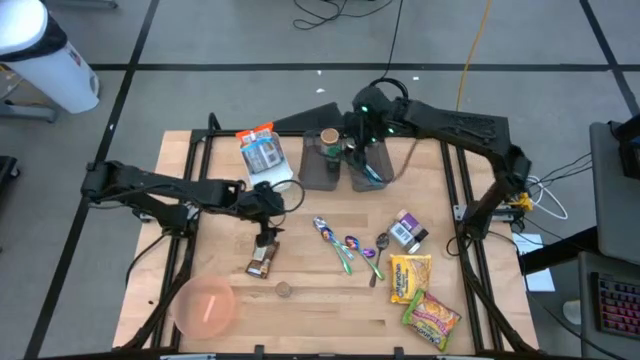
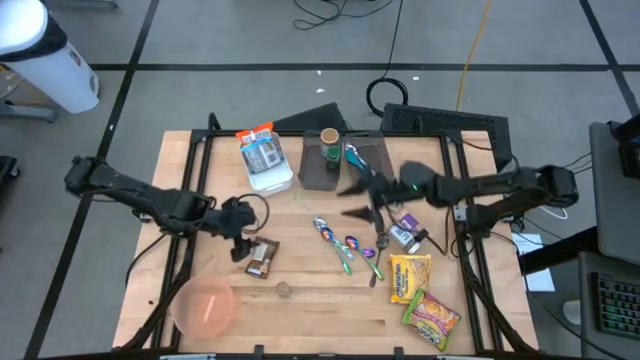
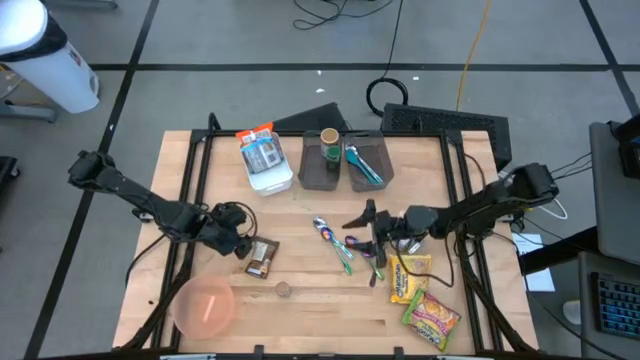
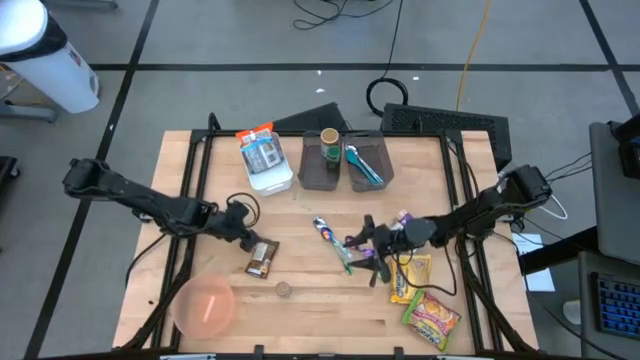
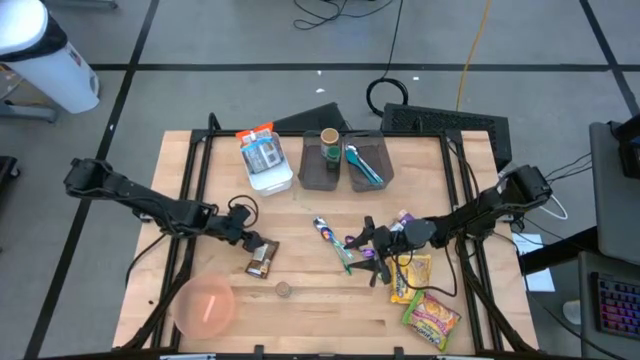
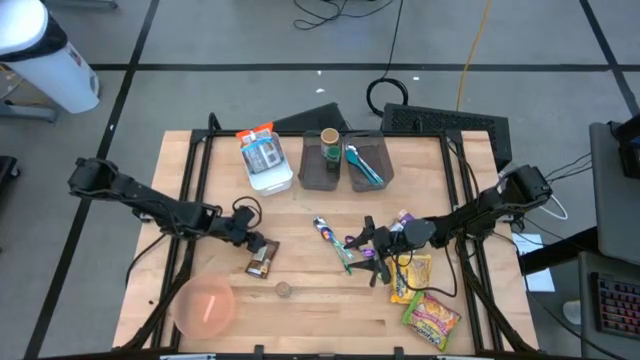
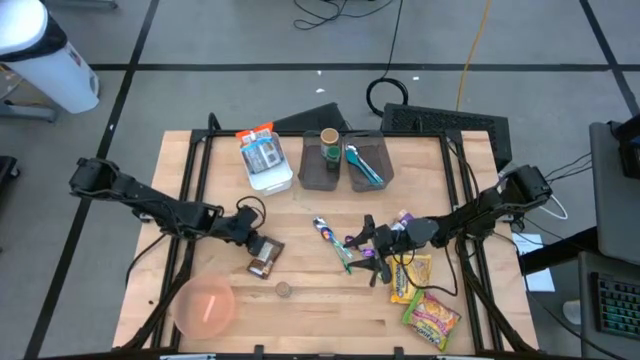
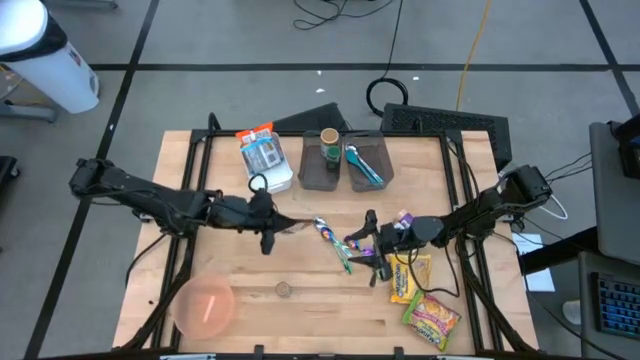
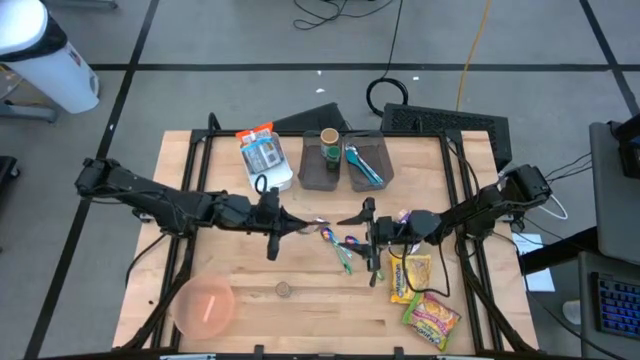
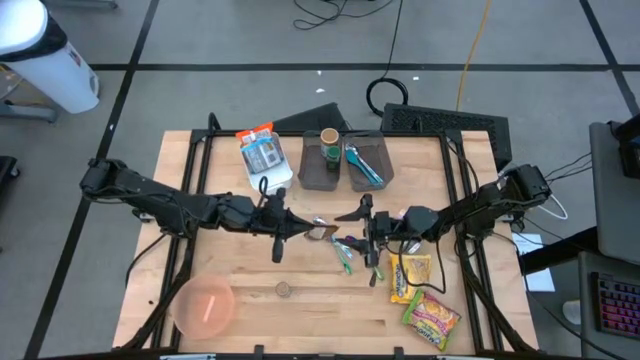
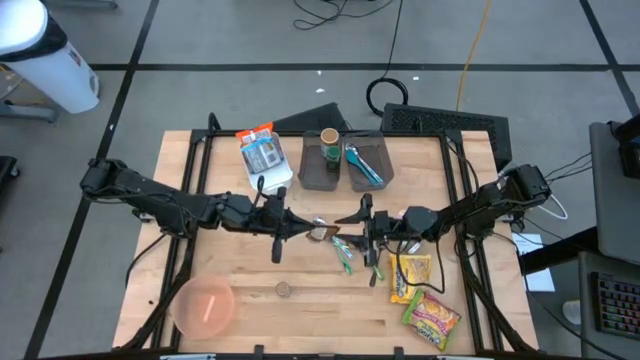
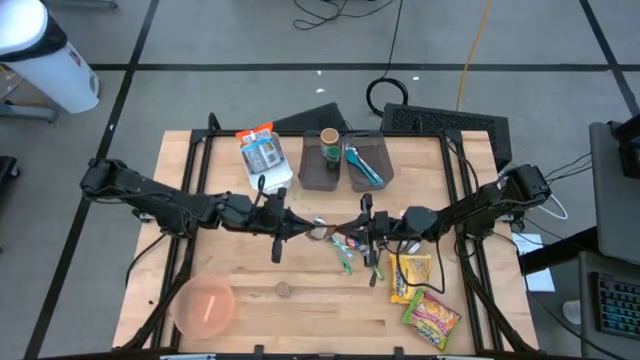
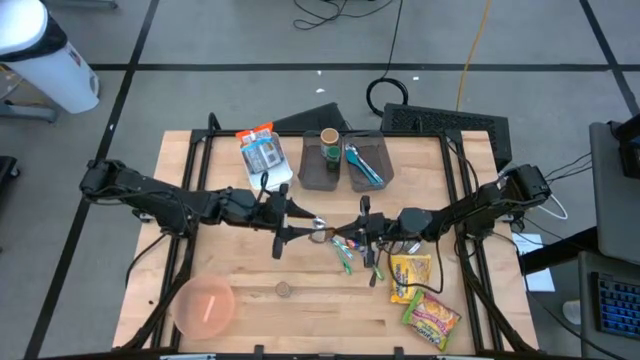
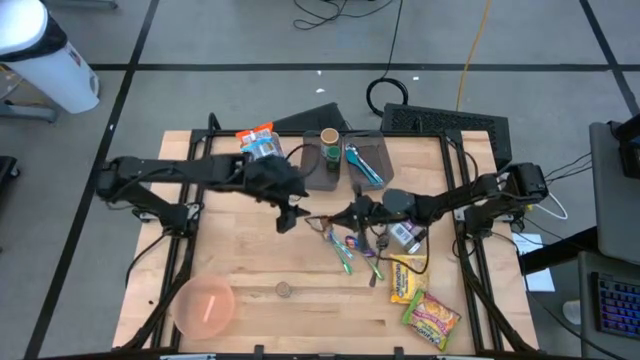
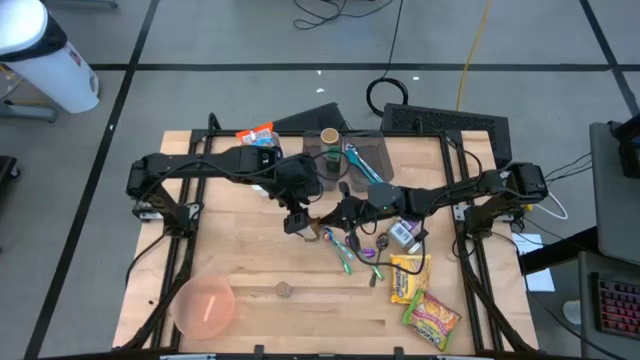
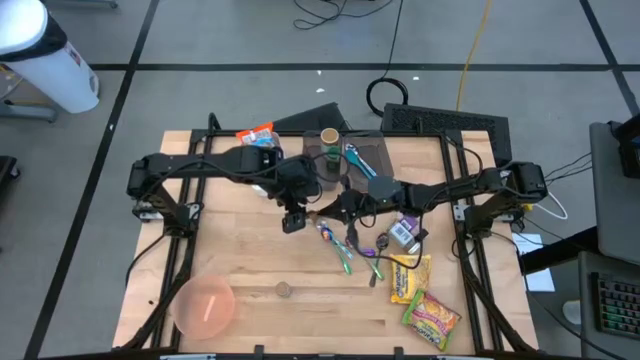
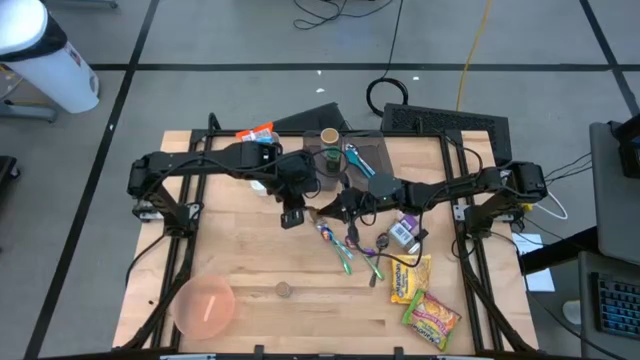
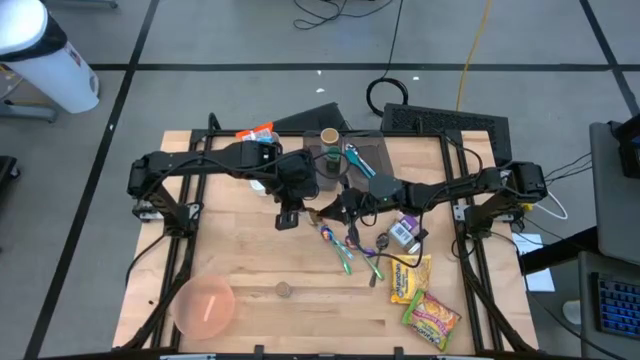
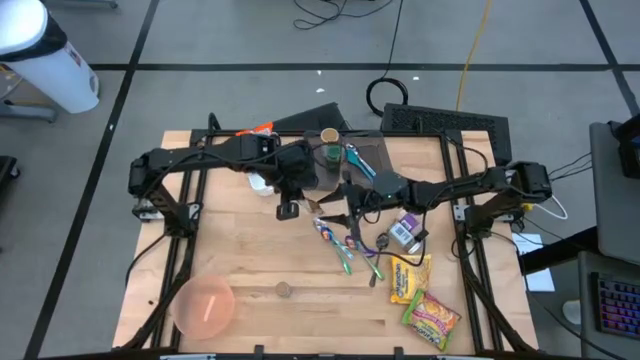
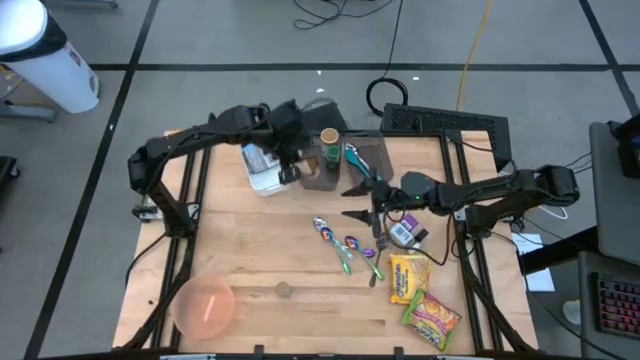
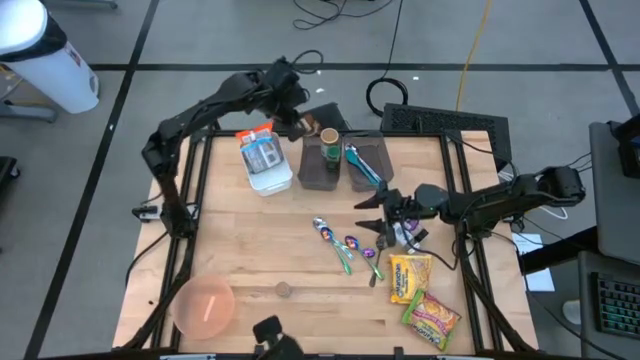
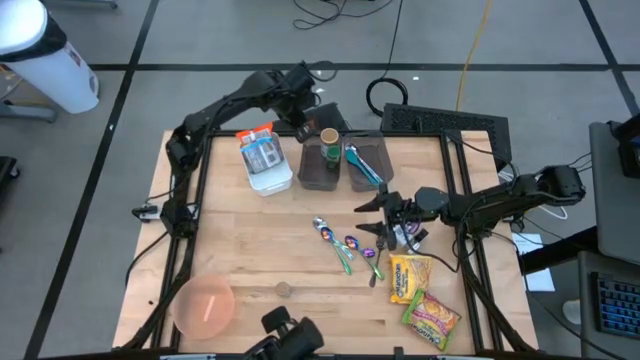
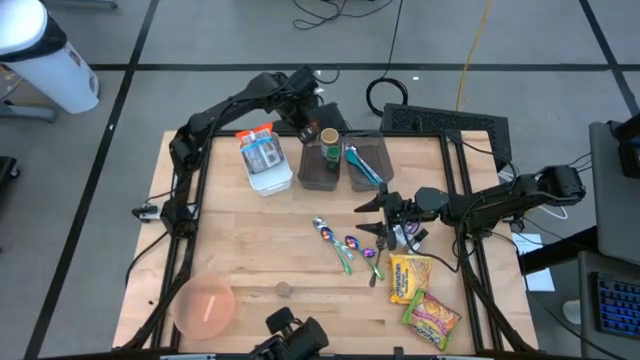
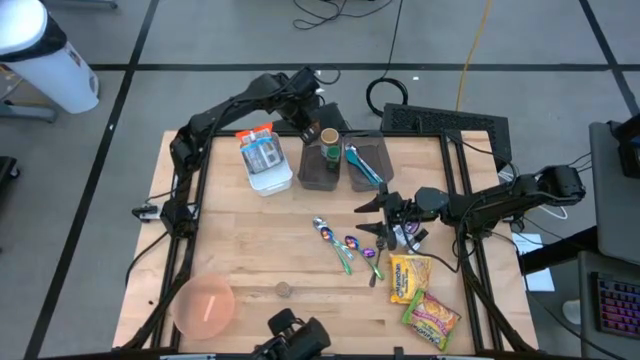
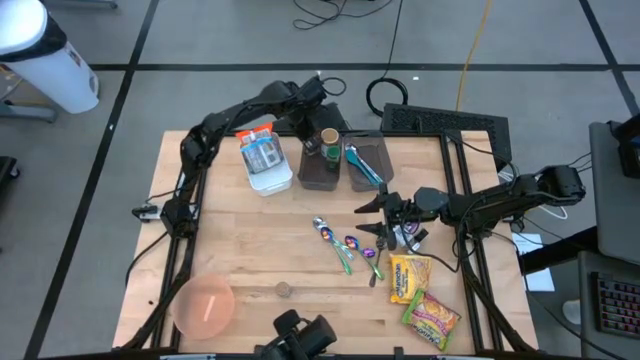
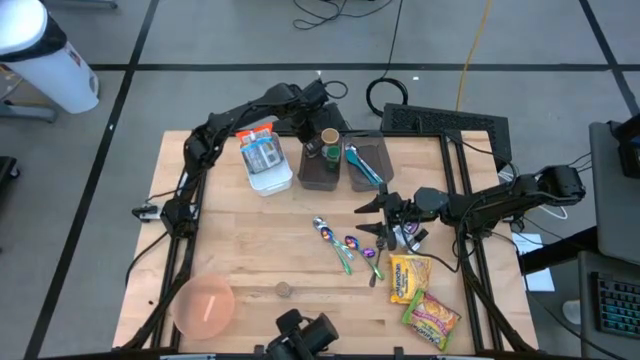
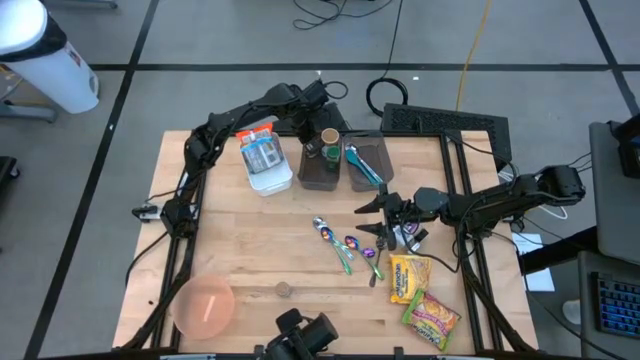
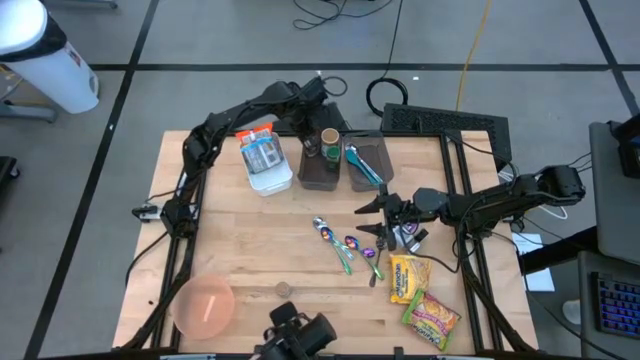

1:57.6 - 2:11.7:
Task: Pick & Place Food Item
Put the orange seasoning pack into the left black bin

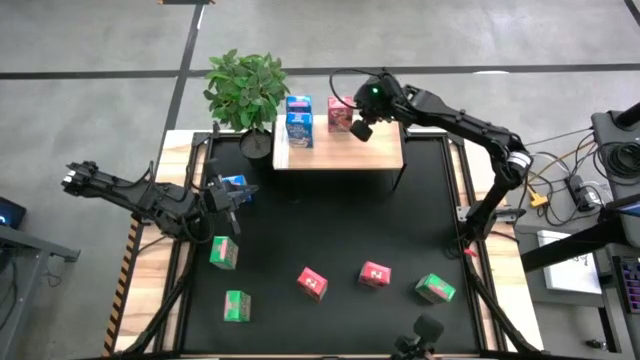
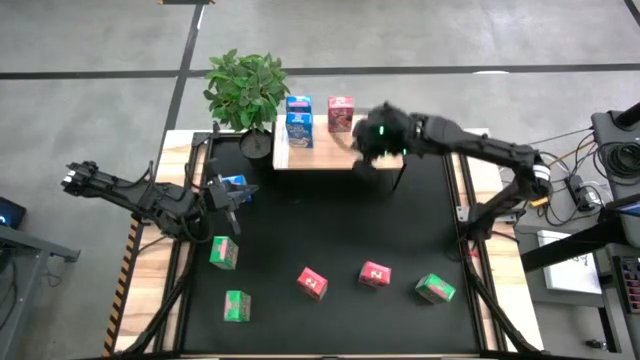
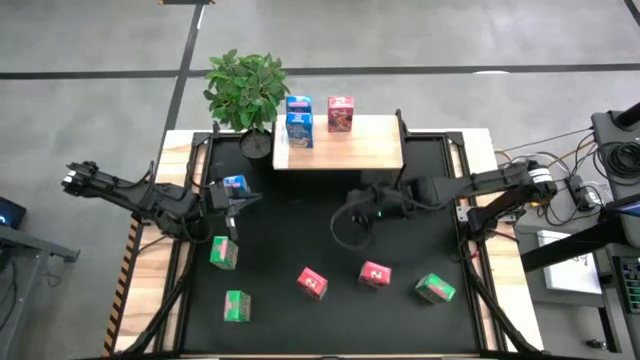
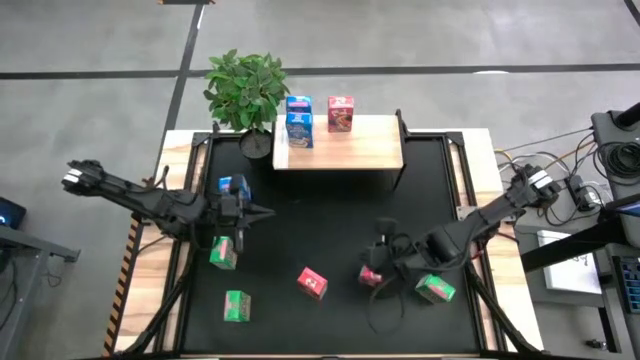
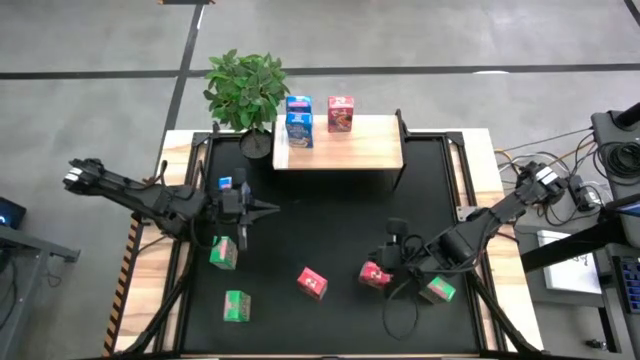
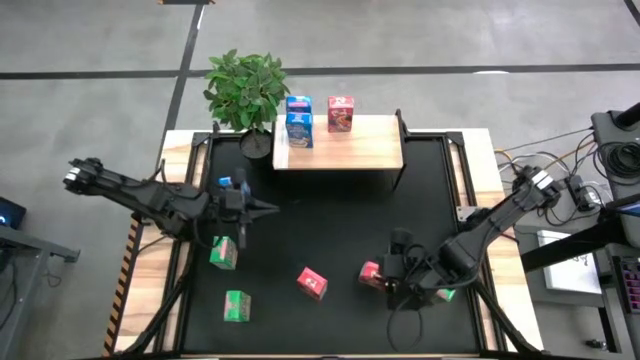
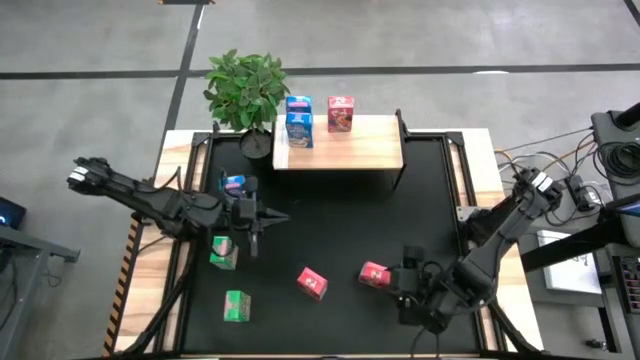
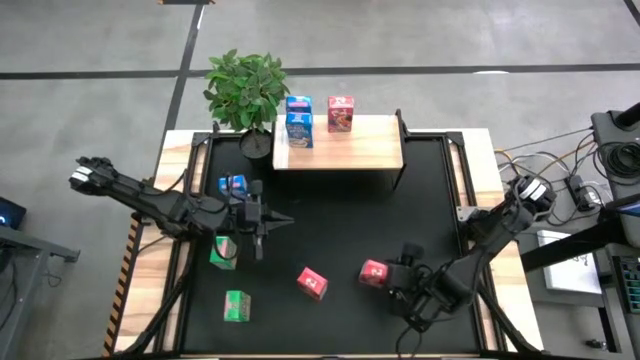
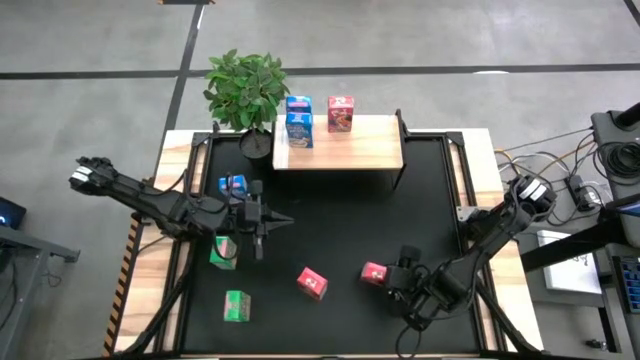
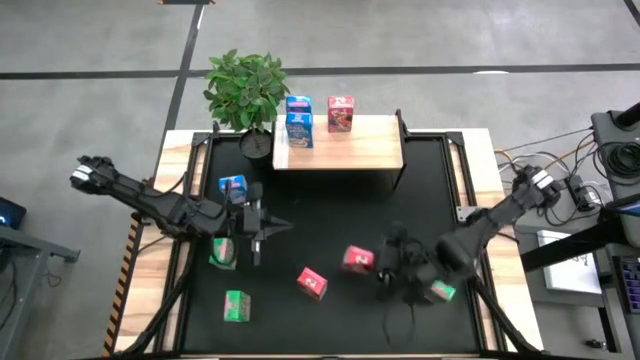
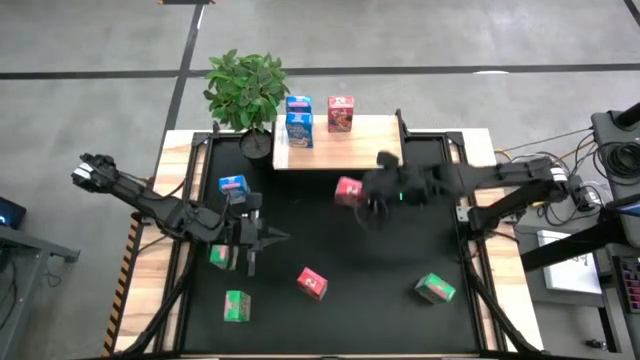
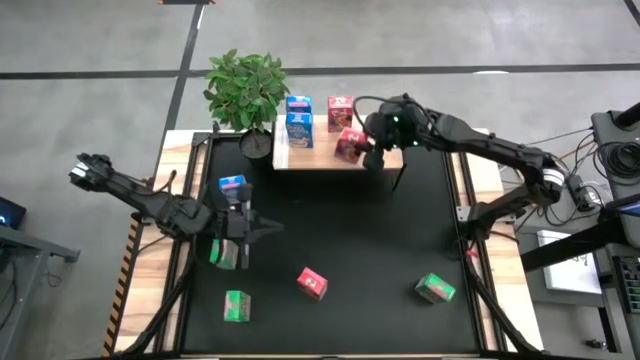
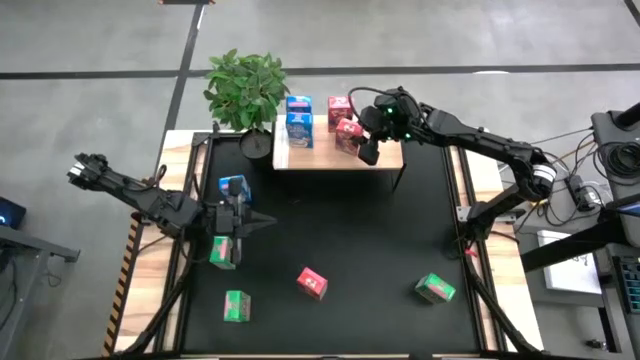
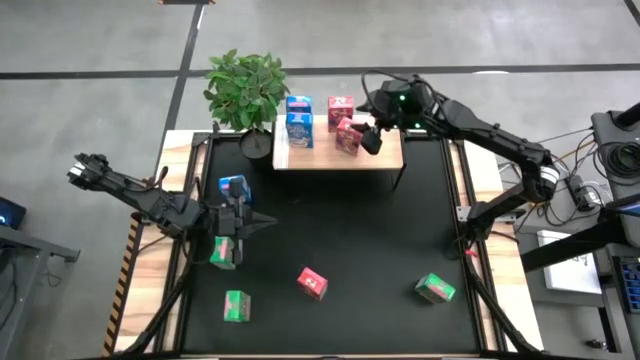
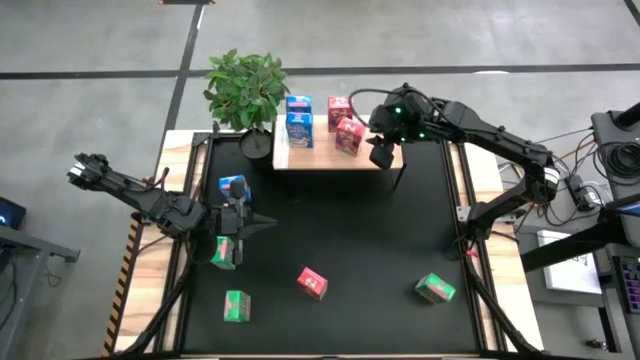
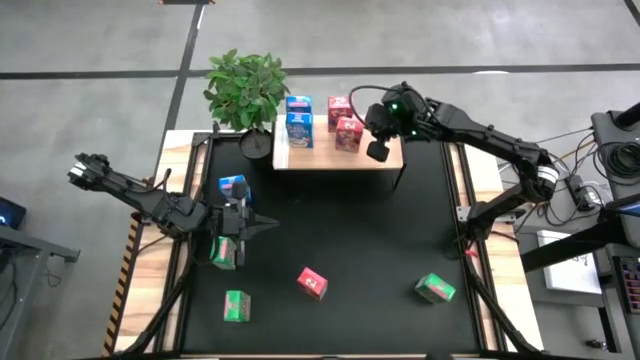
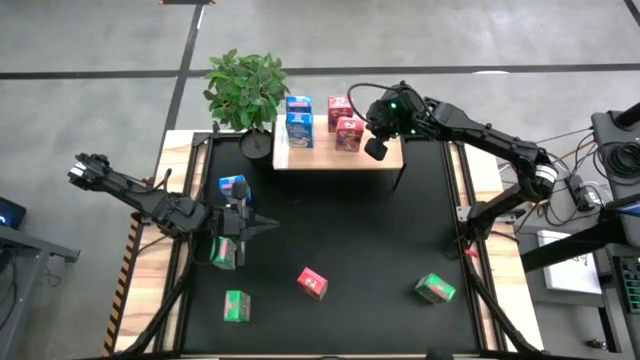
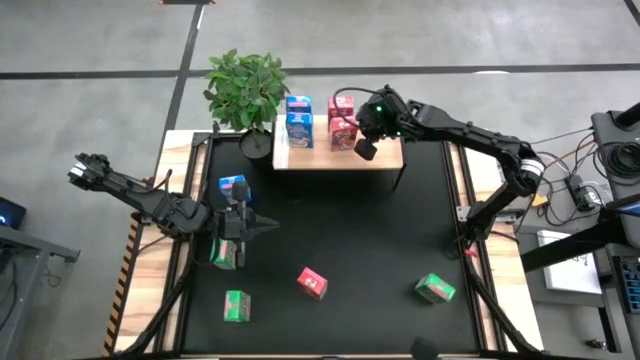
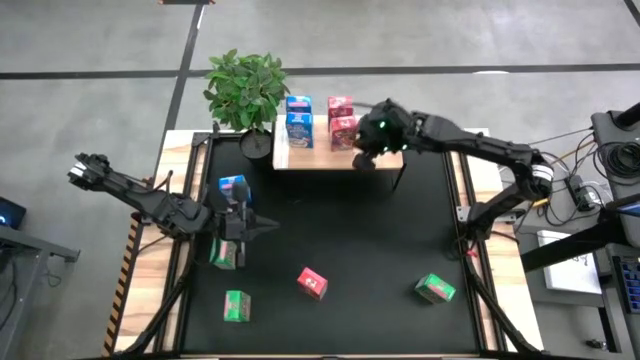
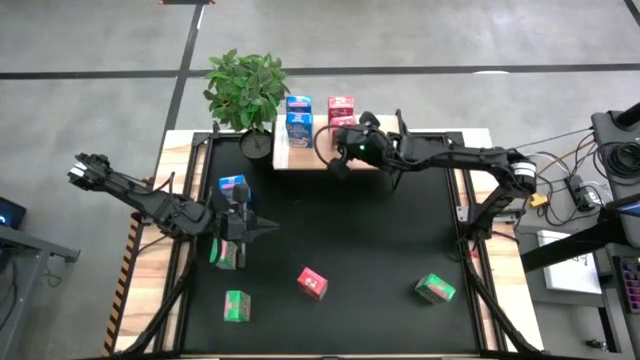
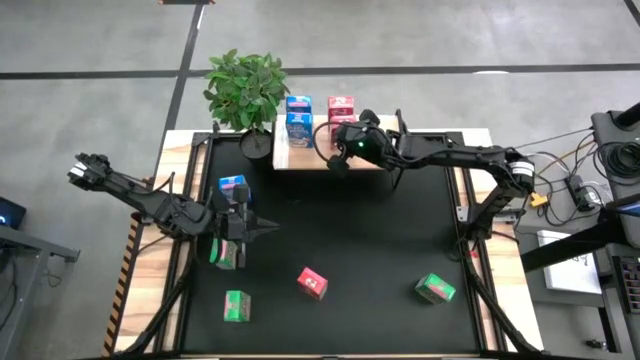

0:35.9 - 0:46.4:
Task: Stack cereal on shelf
Put the right red cereal box aligned with the other red cereal box on the shelf
